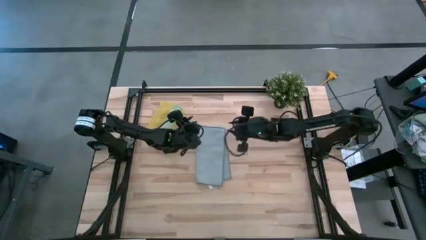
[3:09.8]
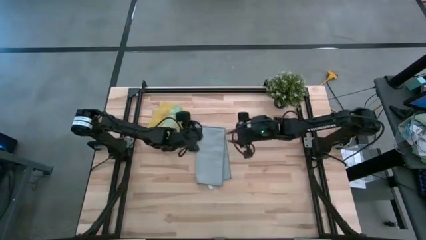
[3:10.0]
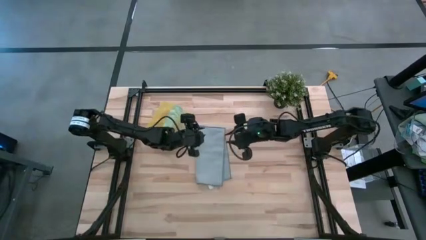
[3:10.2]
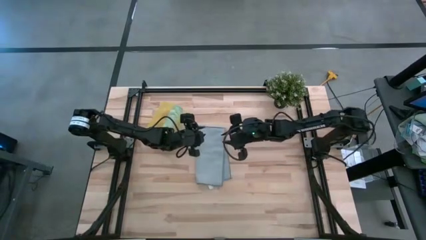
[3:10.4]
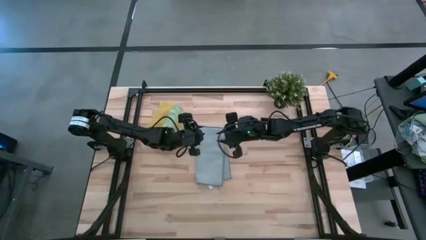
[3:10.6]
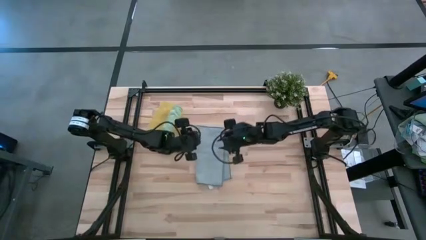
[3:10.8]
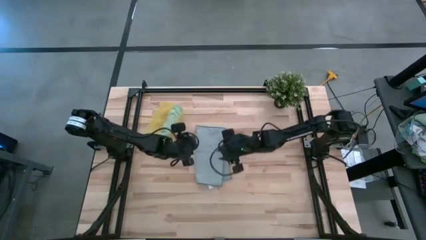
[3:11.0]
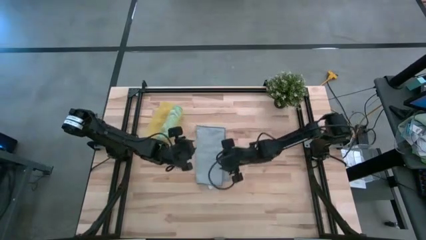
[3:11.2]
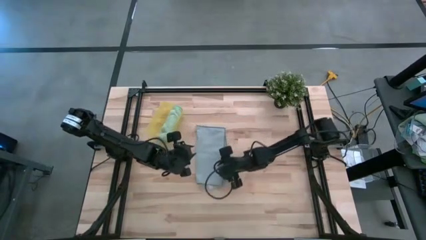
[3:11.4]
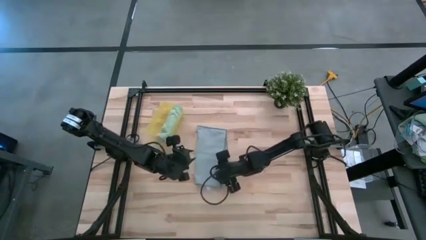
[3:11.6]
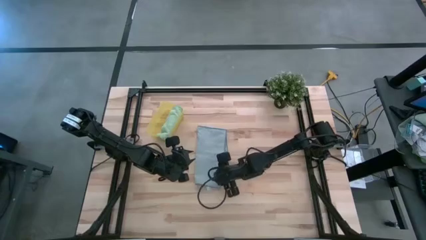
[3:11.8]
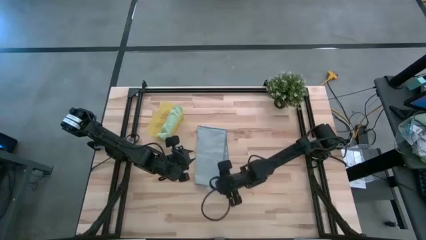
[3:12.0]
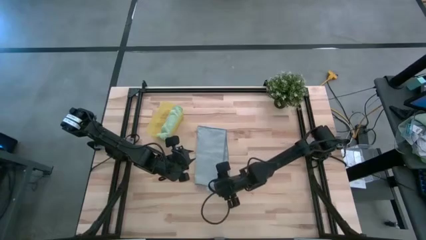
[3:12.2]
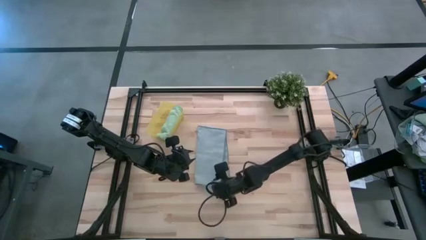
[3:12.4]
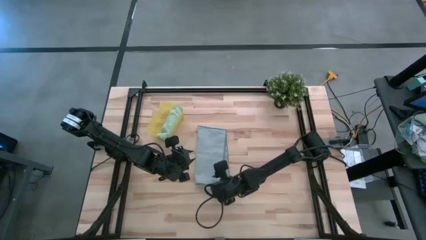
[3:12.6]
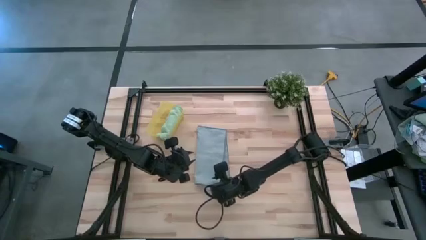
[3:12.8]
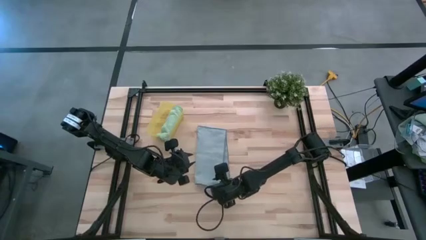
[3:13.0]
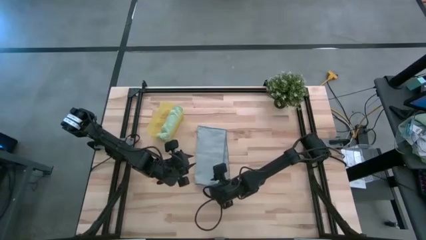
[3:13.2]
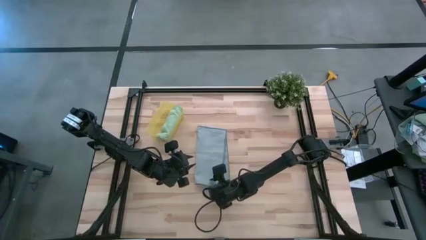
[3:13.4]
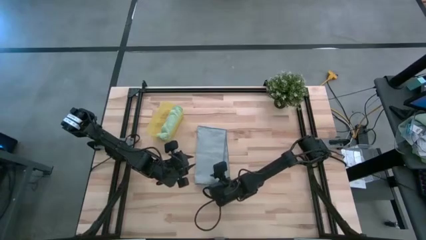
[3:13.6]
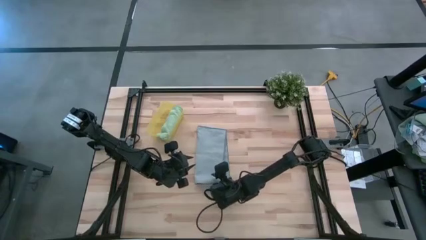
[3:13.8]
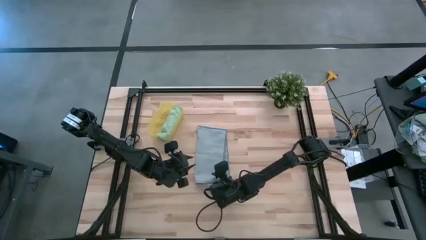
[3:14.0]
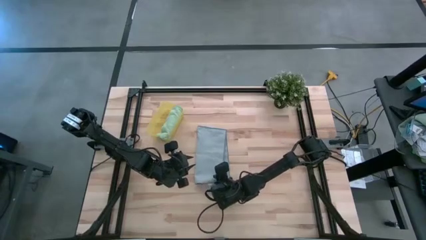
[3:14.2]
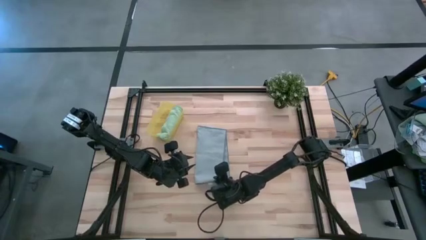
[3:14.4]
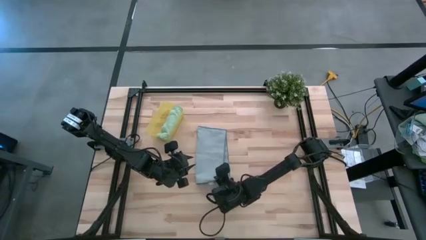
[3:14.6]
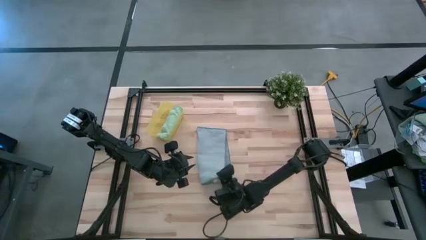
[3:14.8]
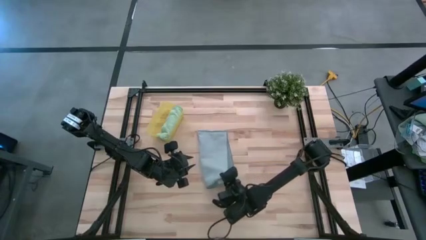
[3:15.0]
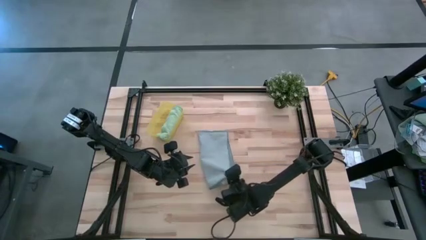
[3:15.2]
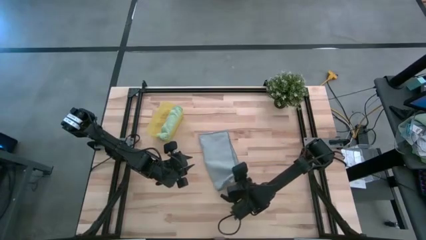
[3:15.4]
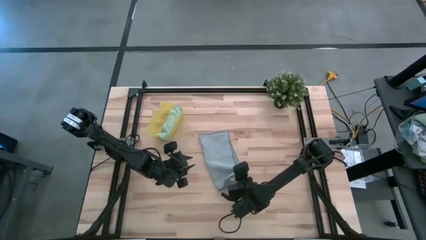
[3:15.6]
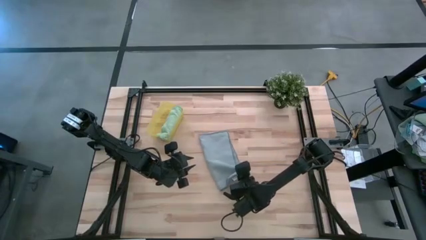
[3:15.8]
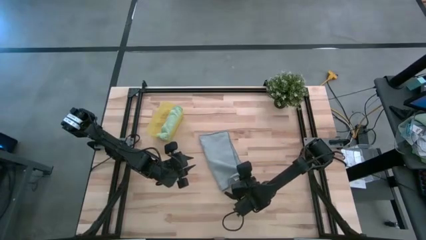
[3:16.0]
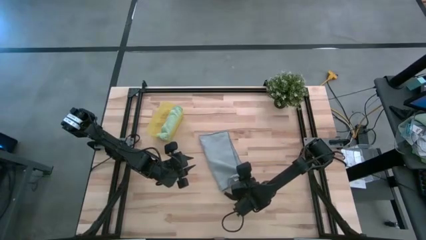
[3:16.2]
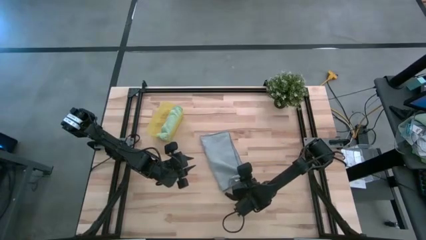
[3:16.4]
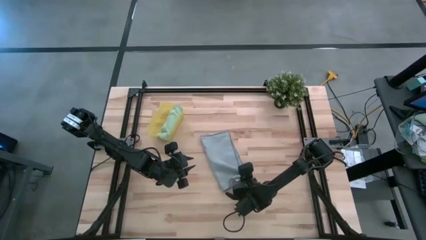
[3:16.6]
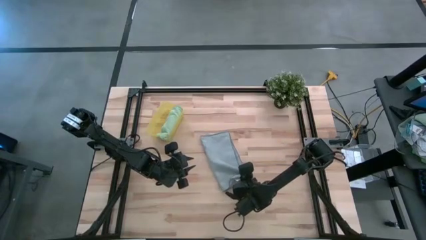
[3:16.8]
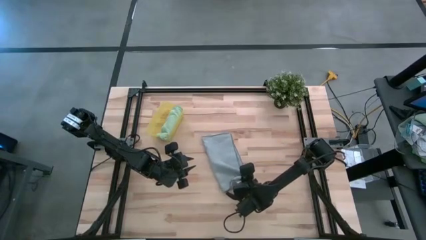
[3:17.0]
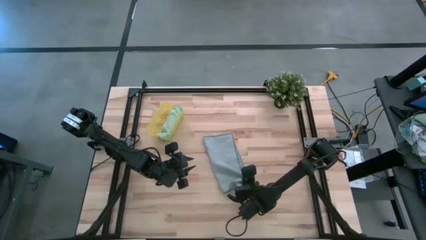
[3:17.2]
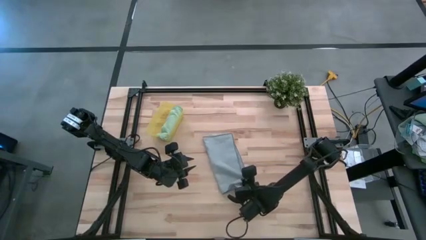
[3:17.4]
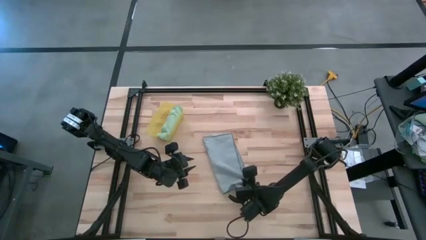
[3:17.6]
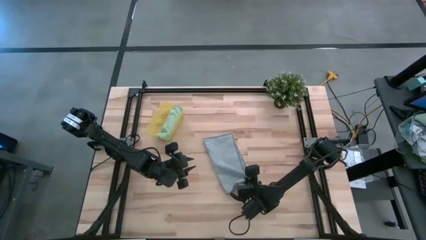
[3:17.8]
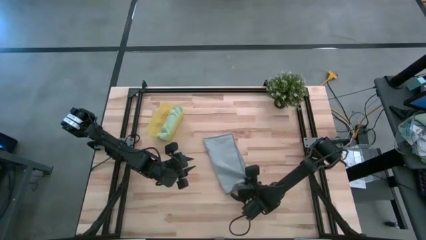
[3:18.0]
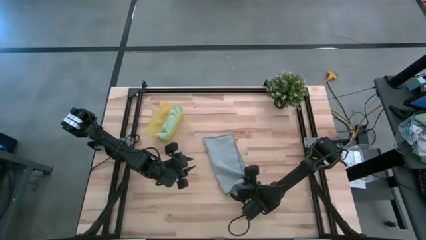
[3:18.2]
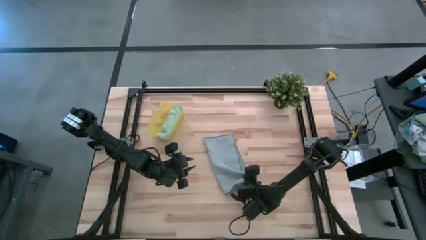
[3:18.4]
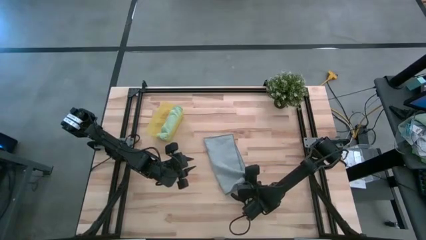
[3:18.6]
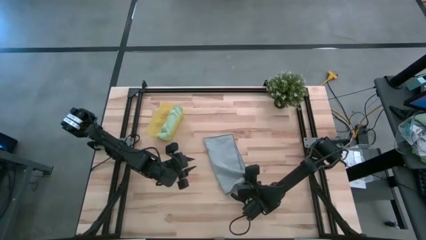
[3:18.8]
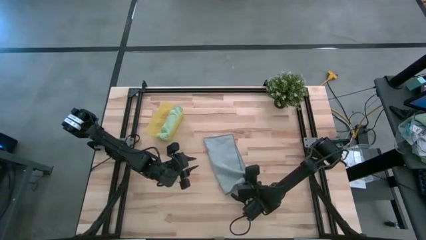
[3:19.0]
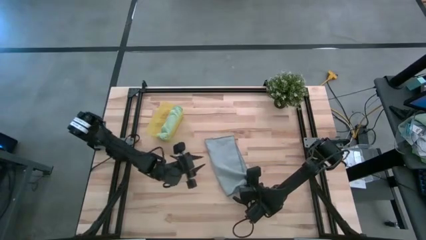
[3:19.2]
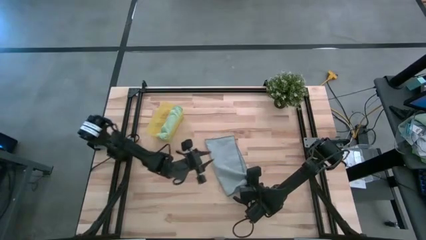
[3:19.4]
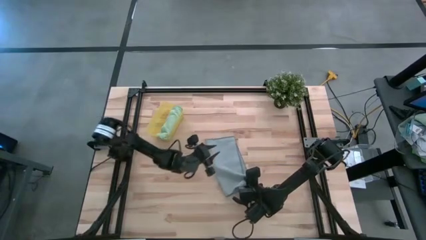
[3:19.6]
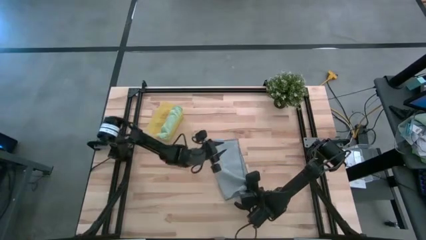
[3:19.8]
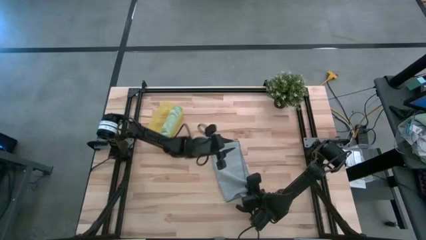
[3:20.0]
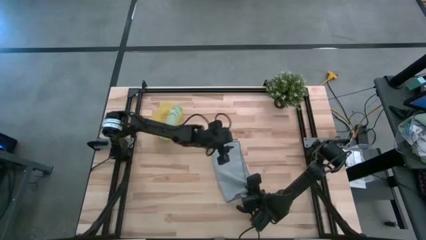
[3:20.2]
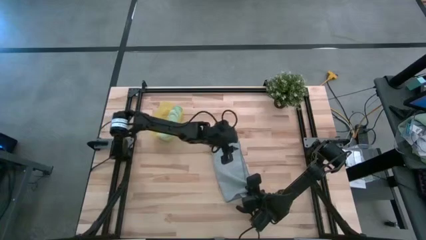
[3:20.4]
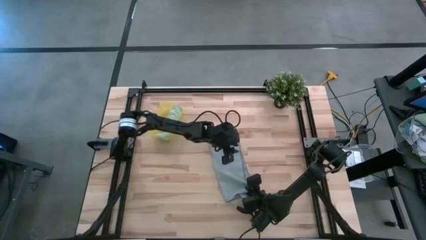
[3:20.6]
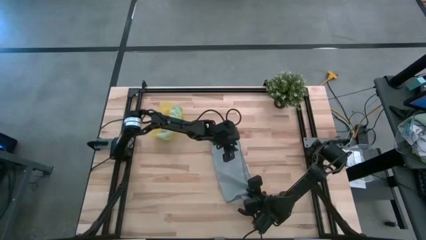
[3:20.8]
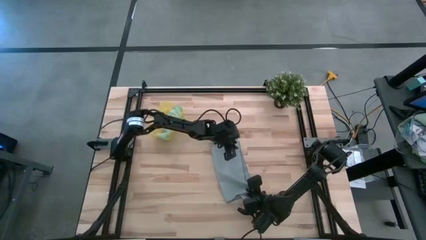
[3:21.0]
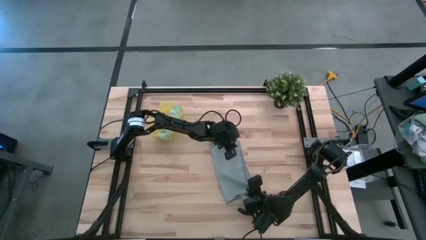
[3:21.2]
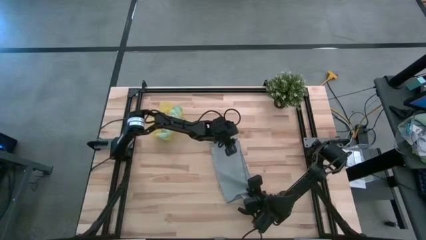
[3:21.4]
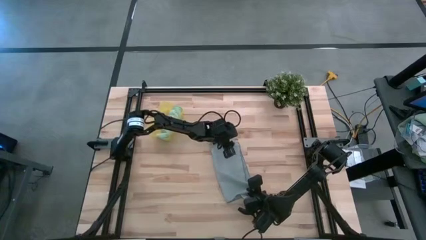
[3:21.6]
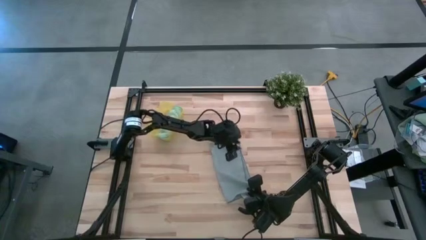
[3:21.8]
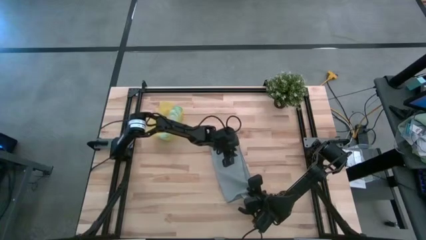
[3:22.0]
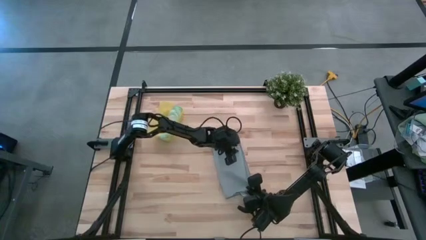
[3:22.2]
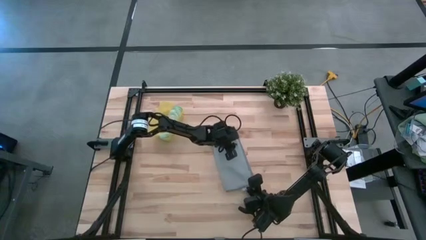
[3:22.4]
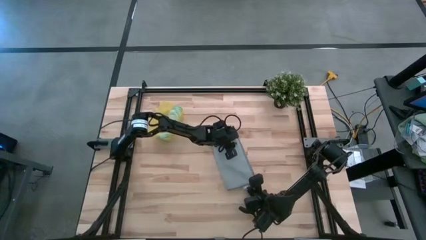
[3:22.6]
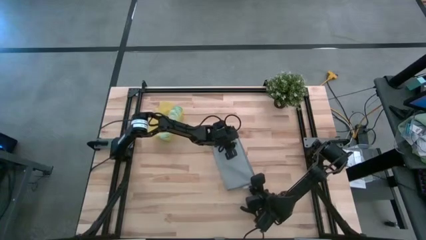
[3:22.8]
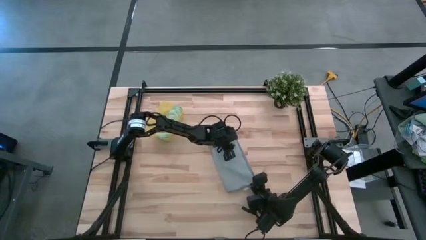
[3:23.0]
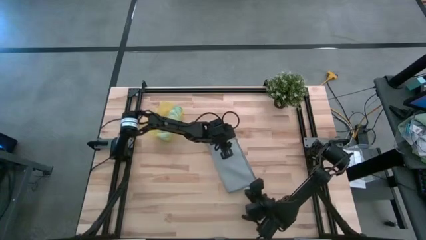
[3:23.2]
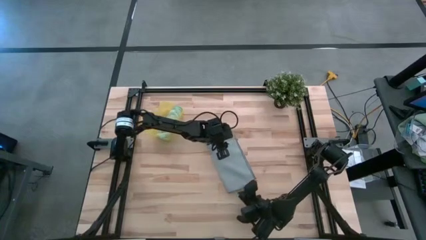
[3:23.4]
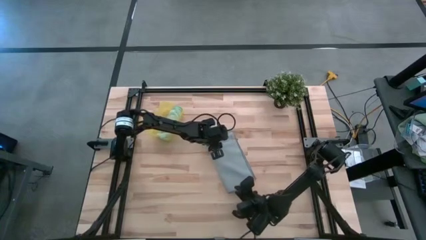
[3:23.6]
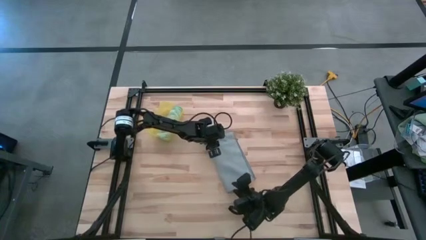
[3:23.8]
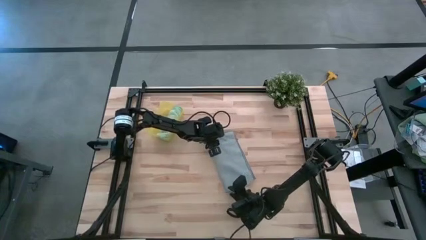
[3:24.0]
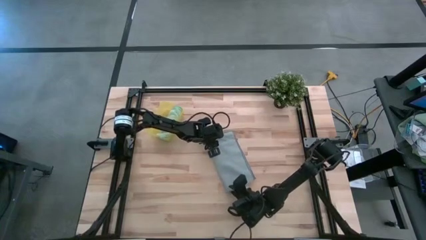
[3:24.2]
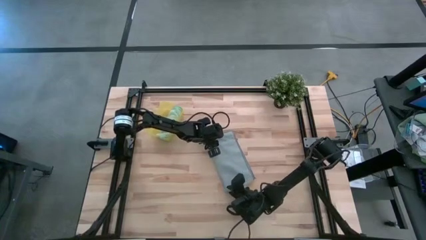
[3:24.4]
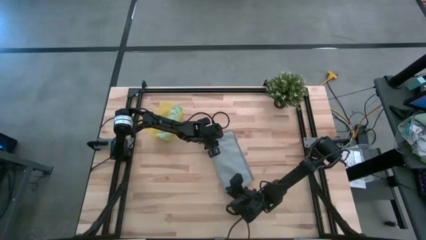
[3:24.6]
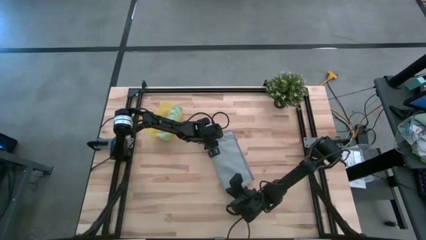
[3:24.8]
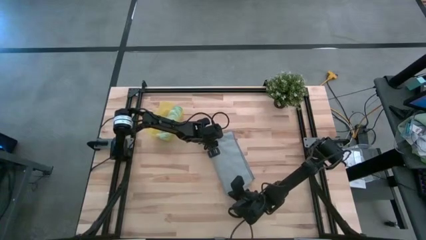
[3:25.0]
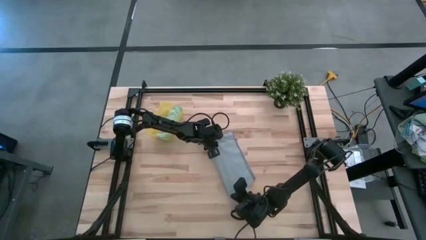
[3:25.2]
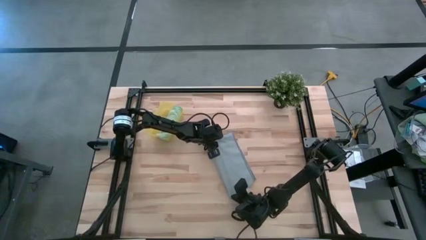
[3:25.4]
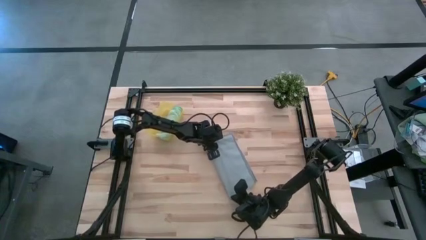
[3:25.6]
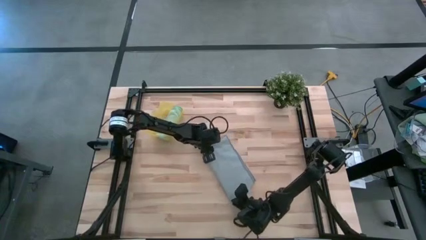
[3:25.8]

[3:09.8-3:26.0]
Task: Roll microfiber towels into tight, uniform cylinder then place into a basket
Fold the gray towel
